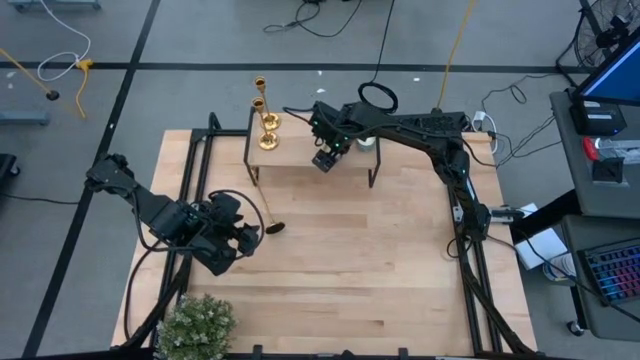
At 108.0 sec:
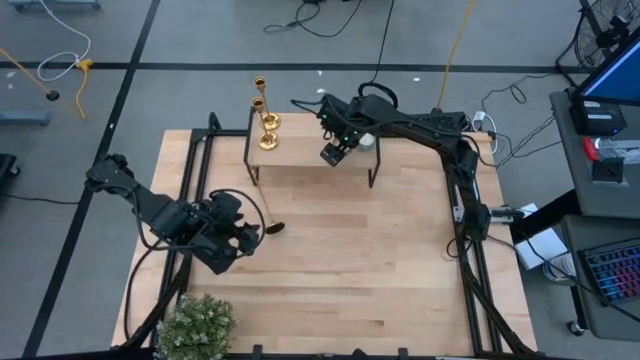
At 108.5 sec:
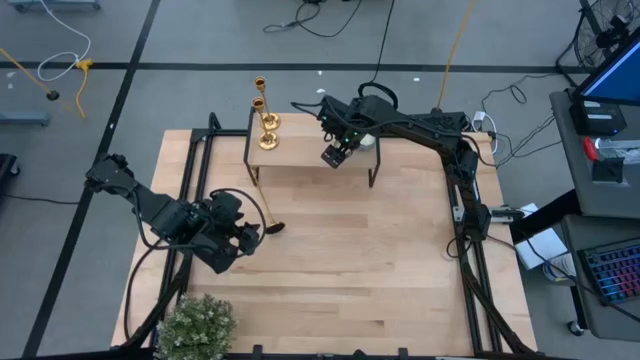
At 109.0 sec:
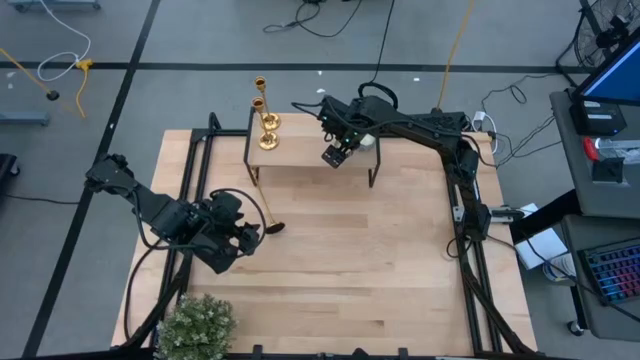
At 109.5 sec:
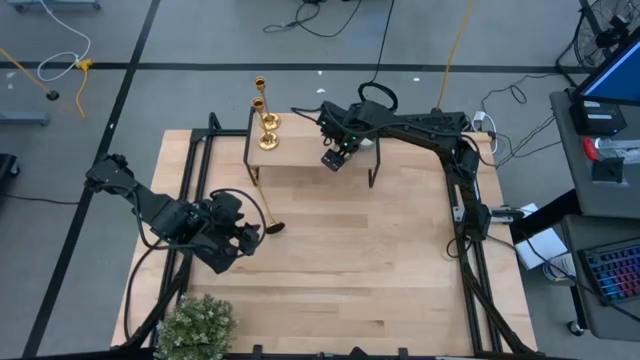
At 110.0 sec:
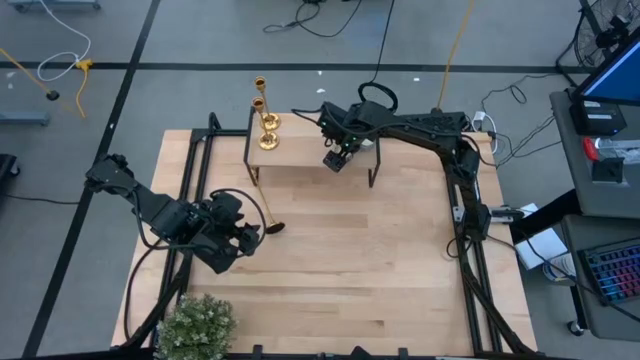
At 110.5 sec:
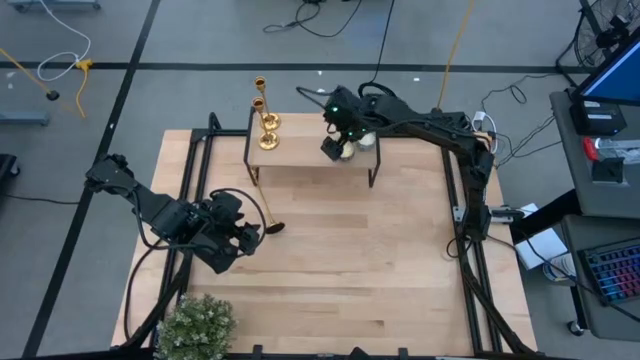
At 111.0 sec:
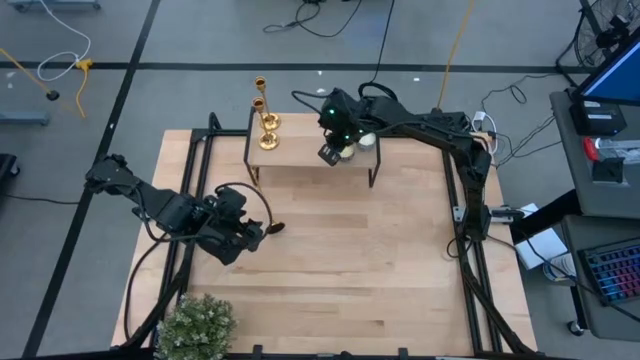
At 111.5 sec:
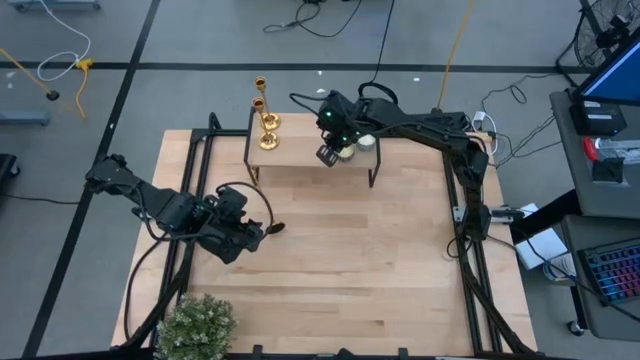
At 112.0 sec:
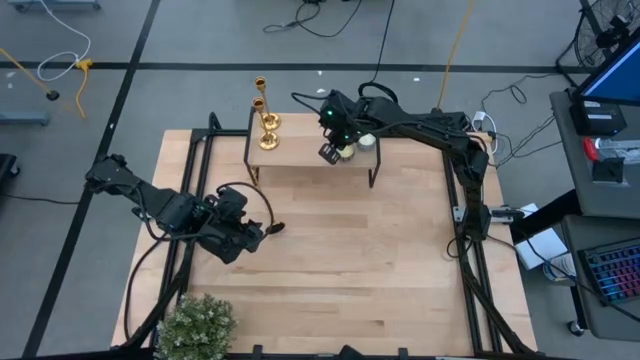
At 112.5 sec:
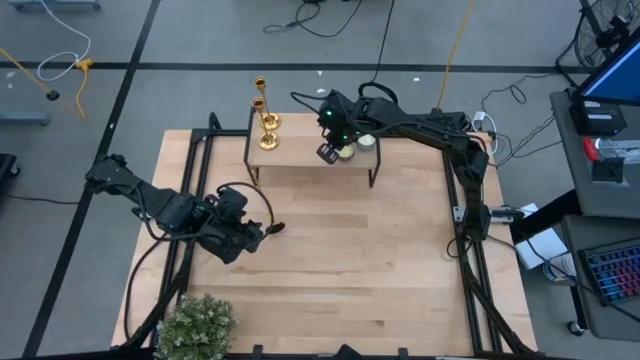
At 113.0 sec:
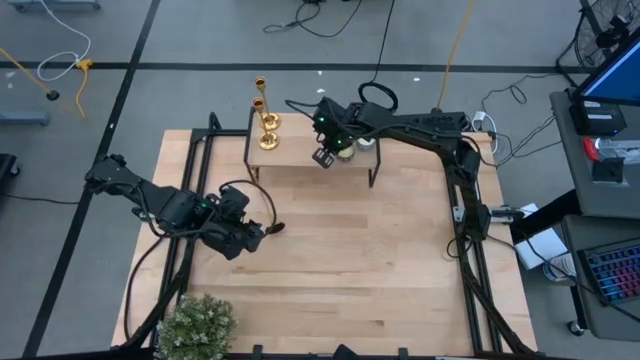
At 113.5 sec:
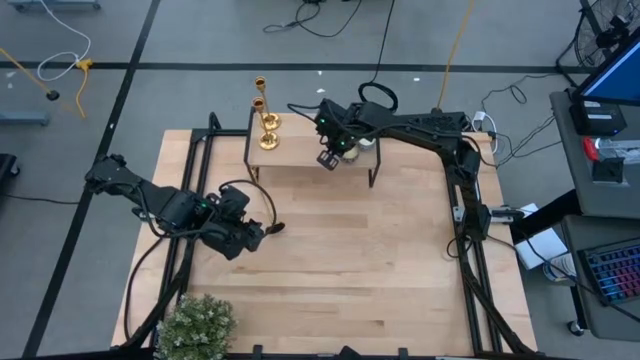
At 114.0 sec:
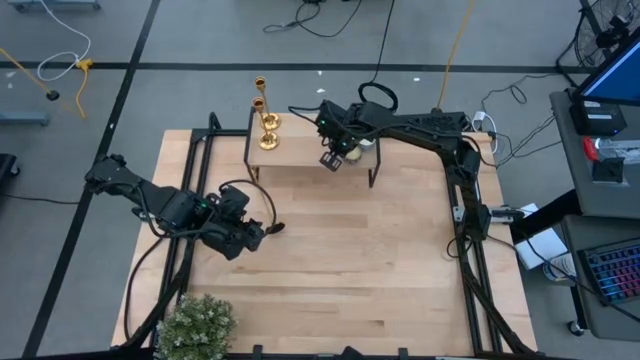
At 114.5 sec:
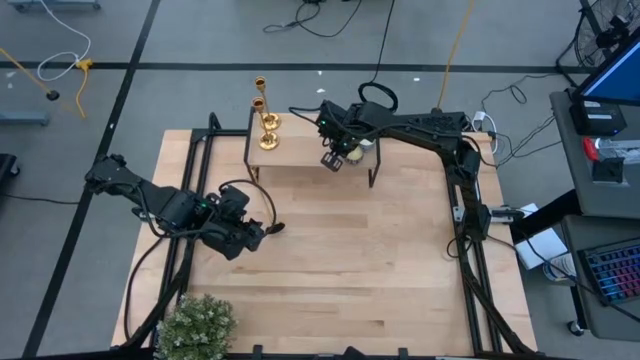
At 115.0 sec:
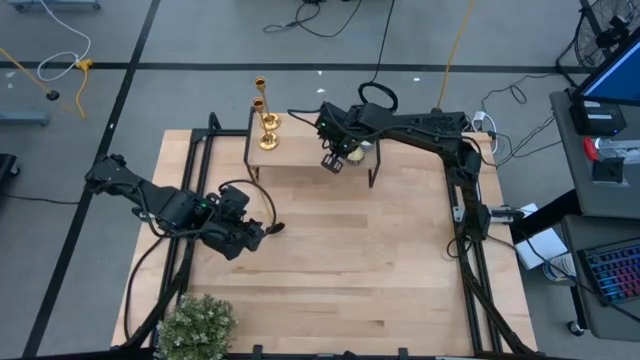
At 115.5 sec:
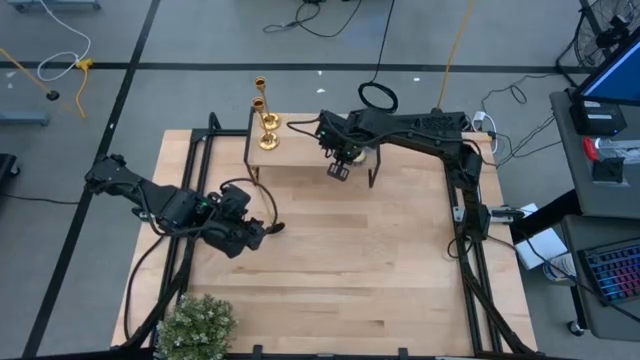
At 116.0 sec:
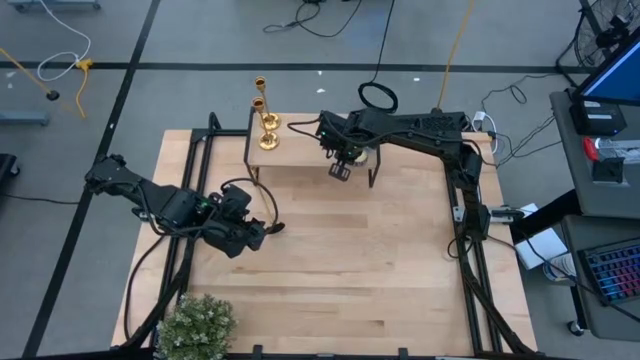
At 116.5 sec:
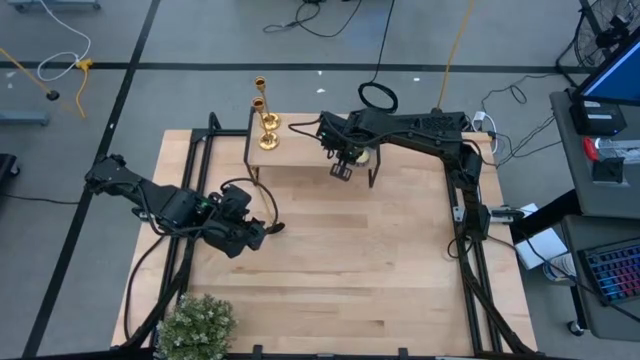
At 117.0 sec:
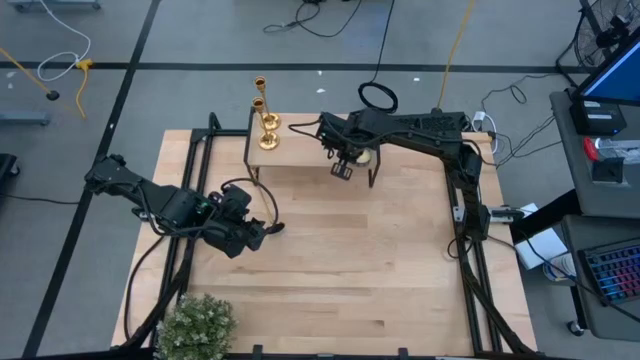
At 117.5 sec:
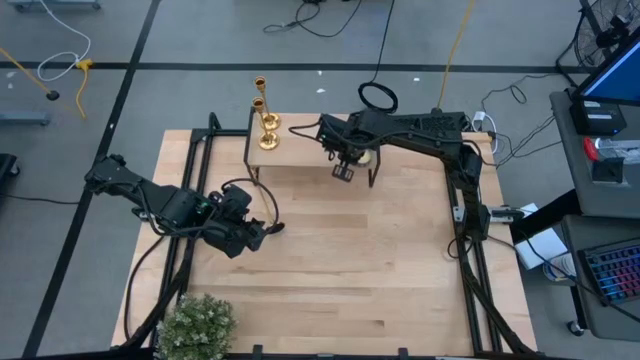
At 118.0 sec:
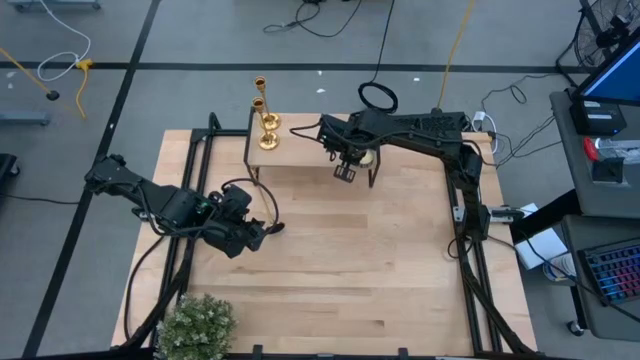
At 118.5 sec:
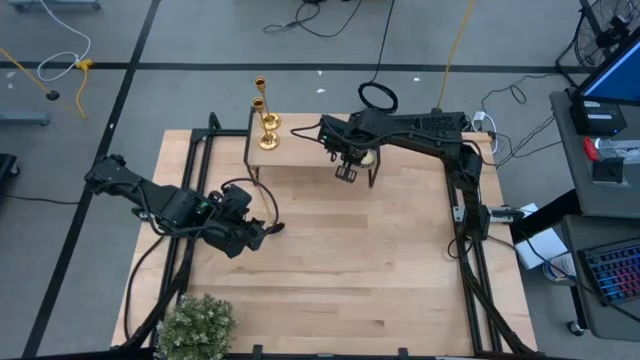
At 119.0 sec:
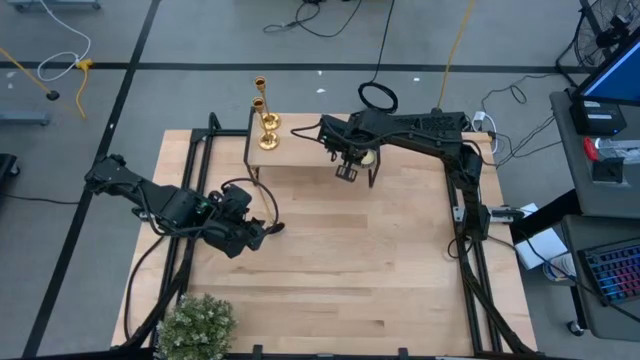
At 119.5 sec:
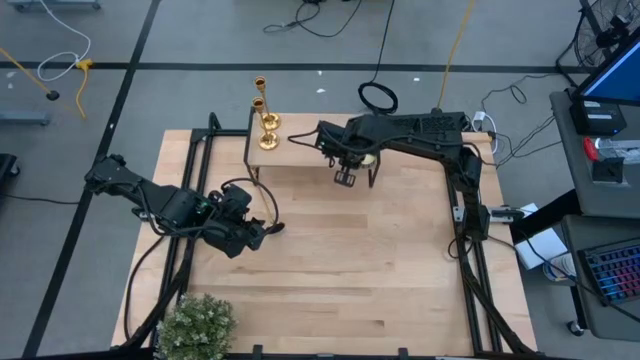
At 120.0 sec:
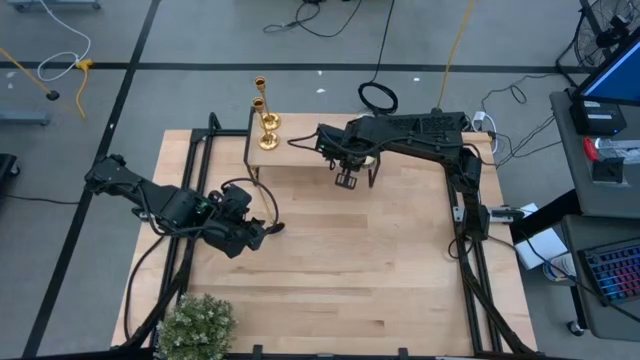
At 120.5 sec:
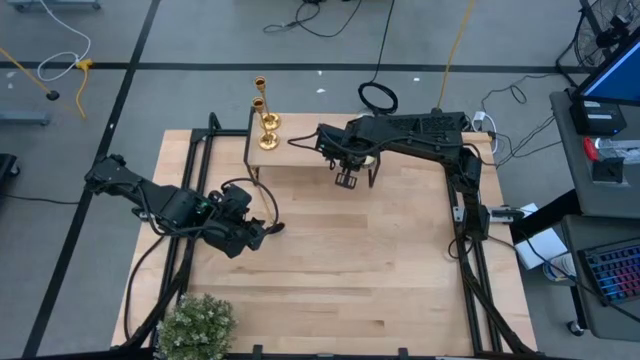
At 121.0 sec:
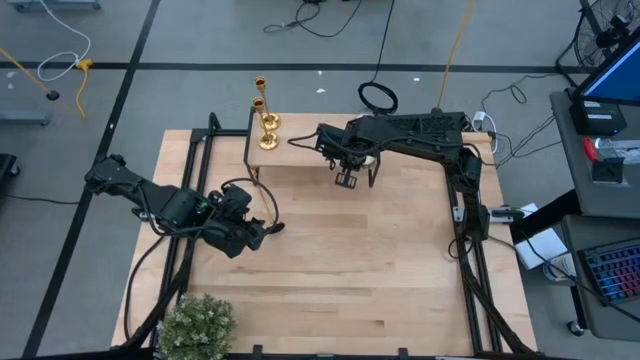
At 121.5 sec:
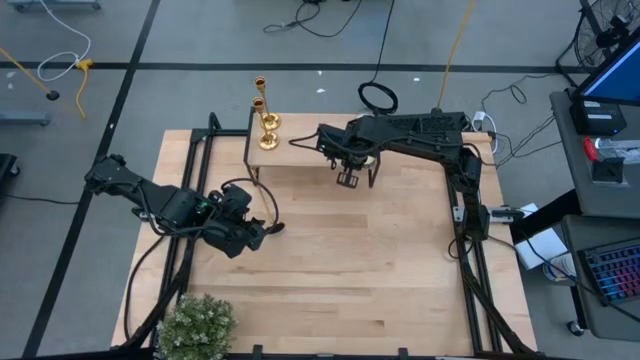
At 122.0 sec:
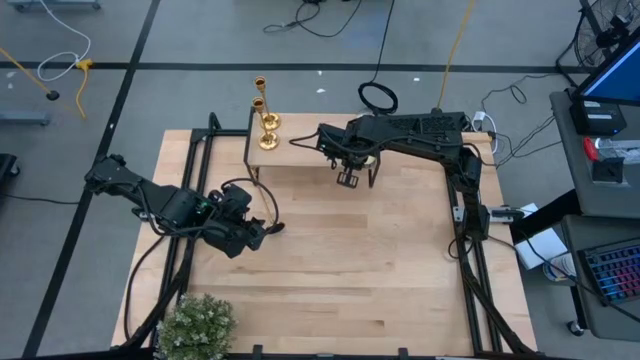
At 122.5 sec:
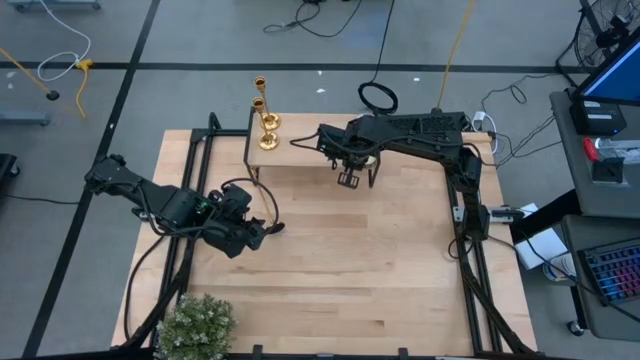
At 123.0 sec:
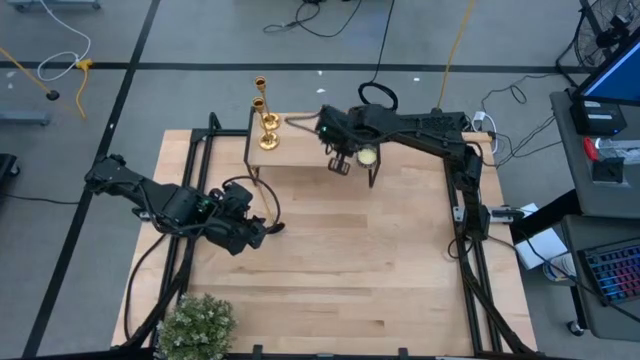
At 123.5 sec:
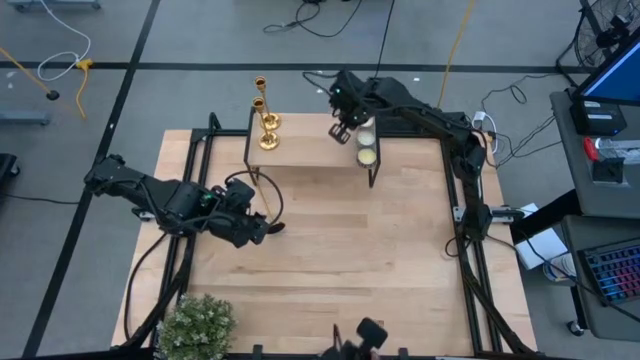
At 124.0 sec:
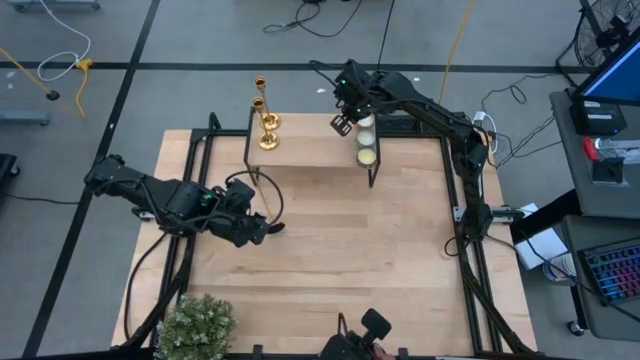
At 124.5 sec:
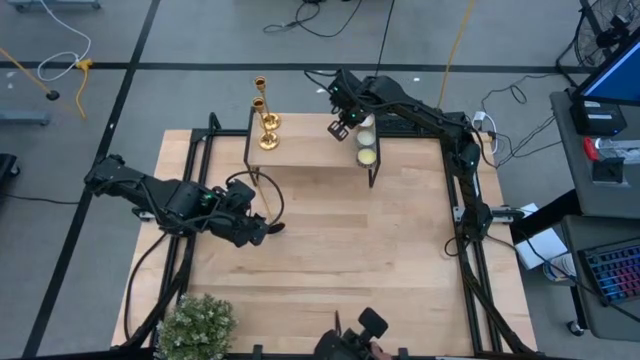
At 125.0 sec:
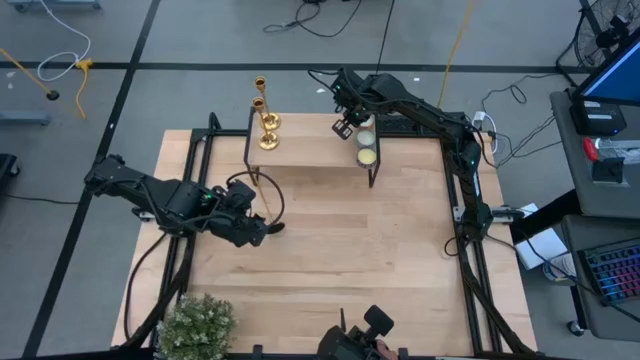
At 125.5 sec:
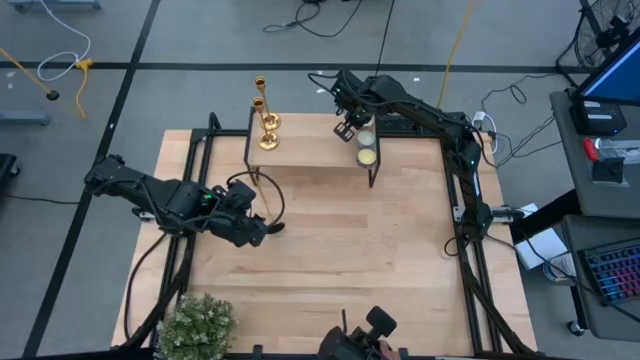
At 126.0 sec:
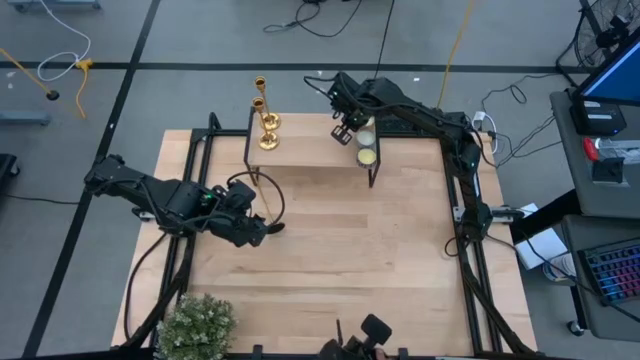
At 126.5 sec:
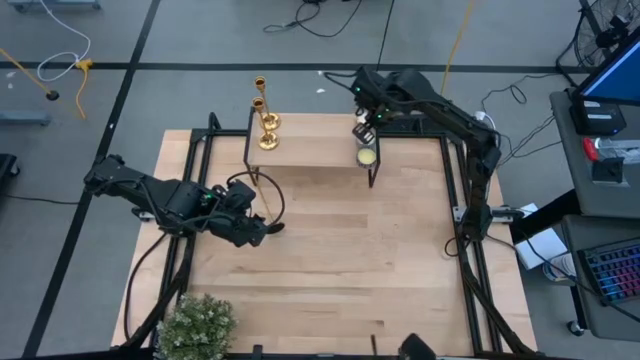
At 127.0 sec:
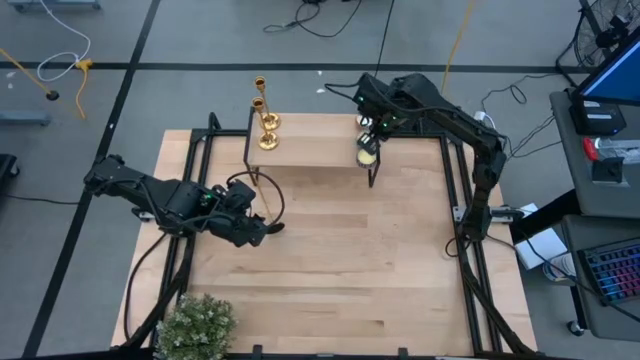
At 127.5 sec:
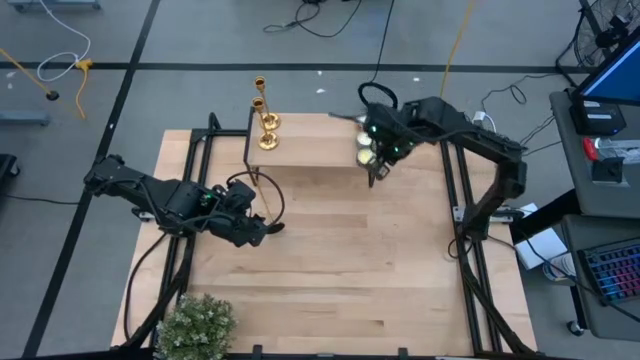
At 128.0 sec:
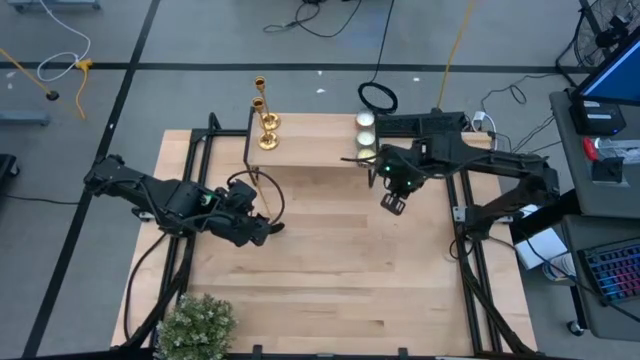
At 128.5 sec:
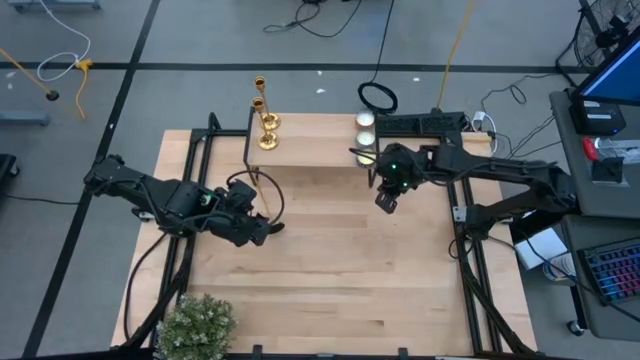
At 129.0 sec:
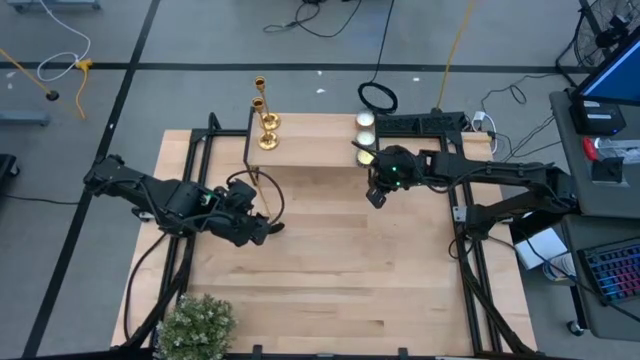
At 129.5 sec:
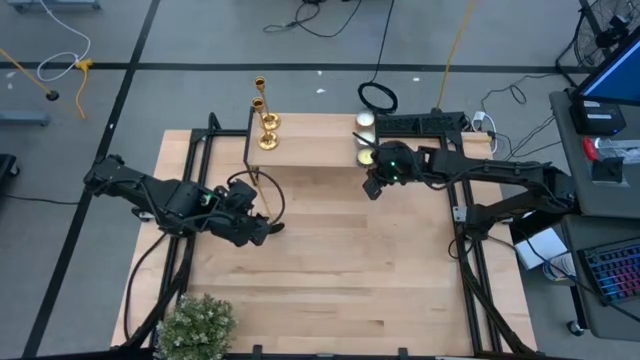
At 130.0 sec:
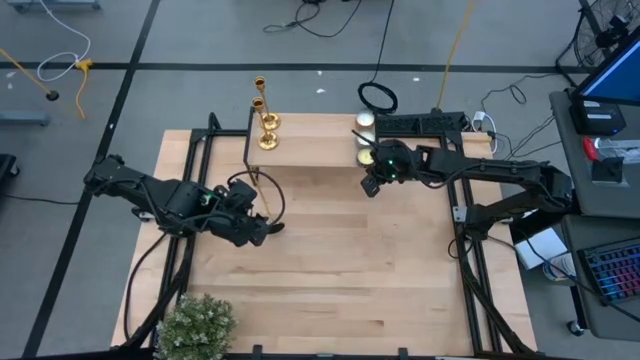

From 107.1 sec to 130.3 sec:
Task: Pick & Place candle stick holders
Put the red white scented candle on the shelf
